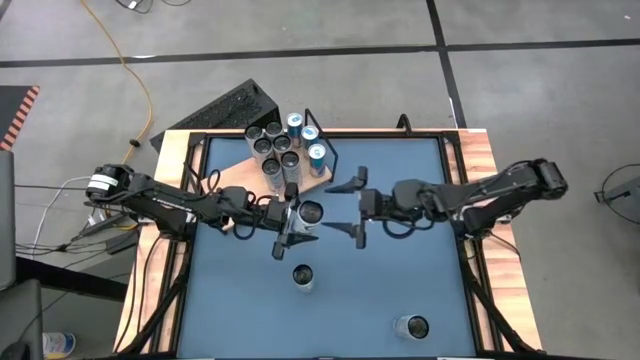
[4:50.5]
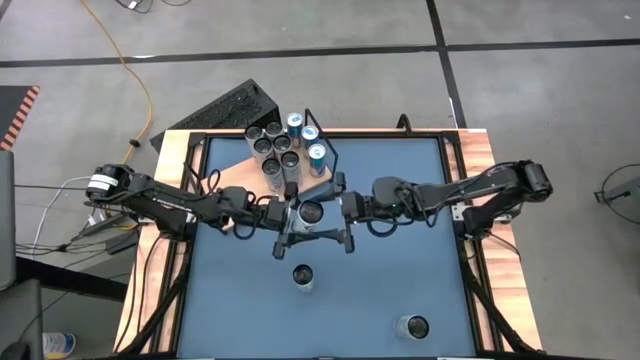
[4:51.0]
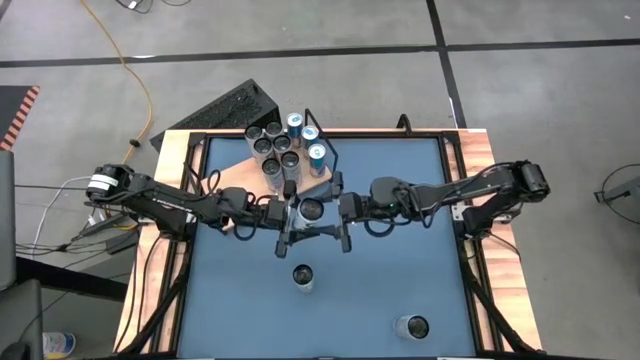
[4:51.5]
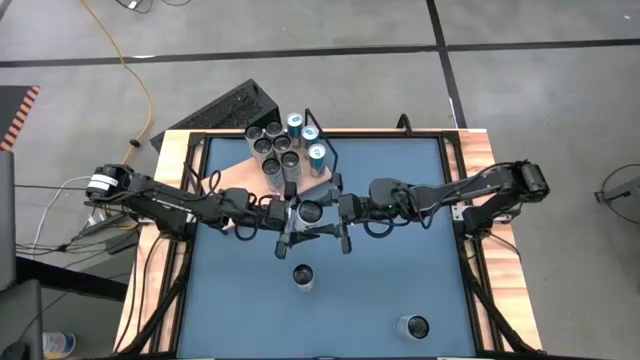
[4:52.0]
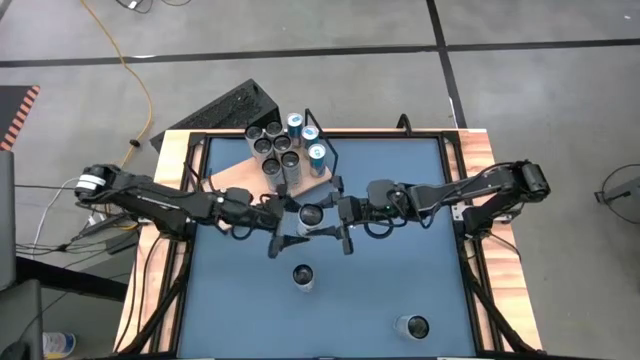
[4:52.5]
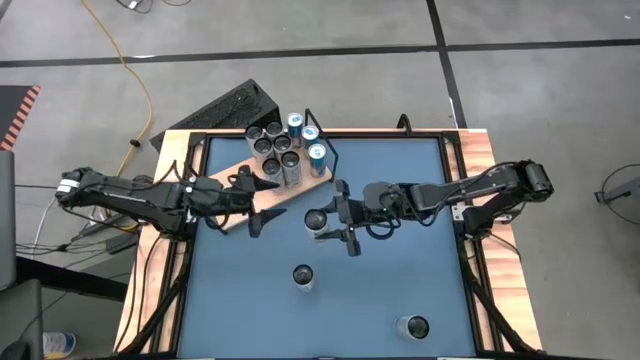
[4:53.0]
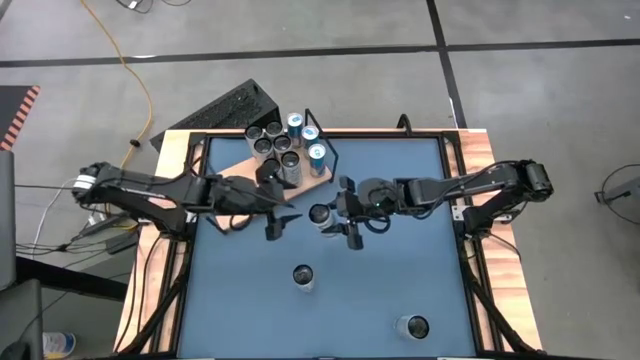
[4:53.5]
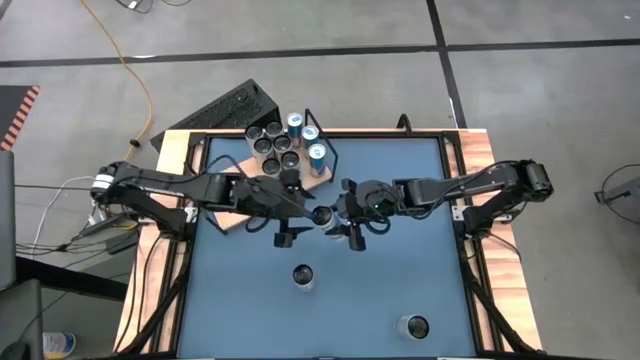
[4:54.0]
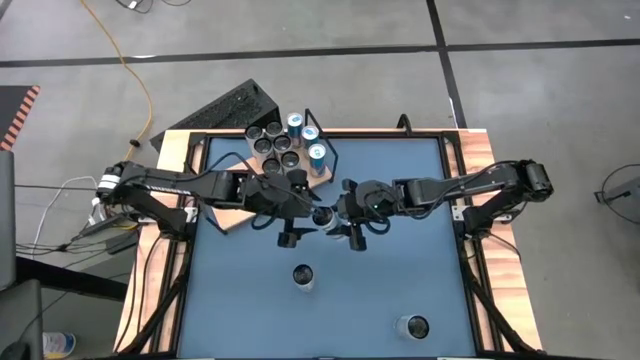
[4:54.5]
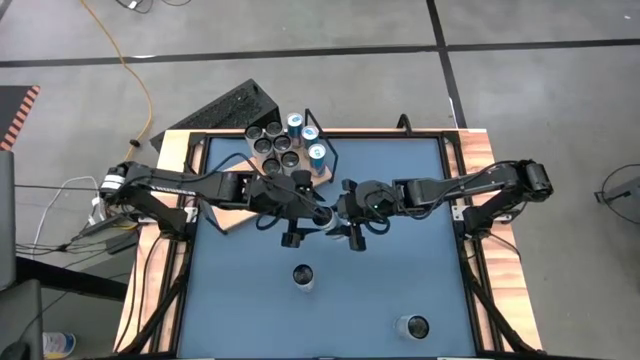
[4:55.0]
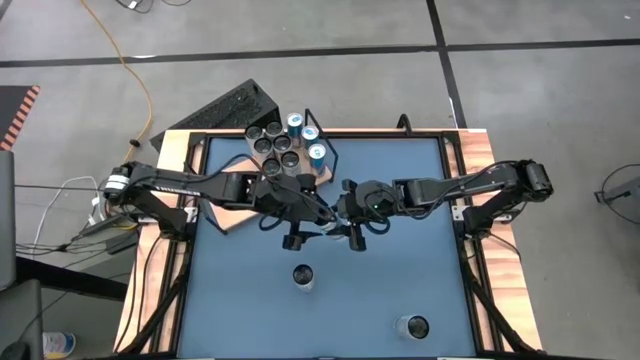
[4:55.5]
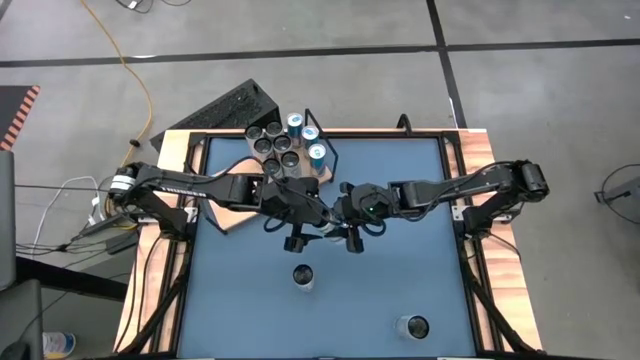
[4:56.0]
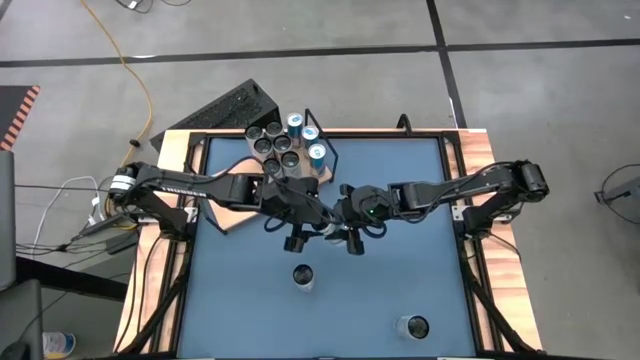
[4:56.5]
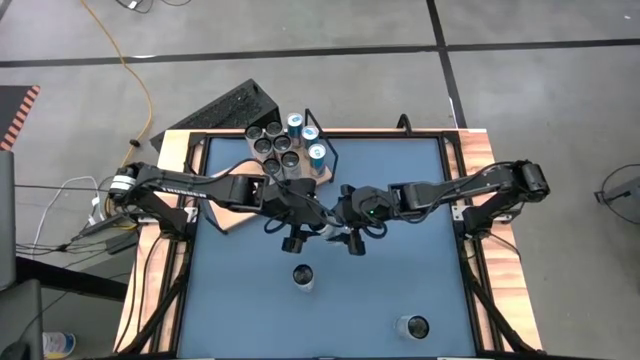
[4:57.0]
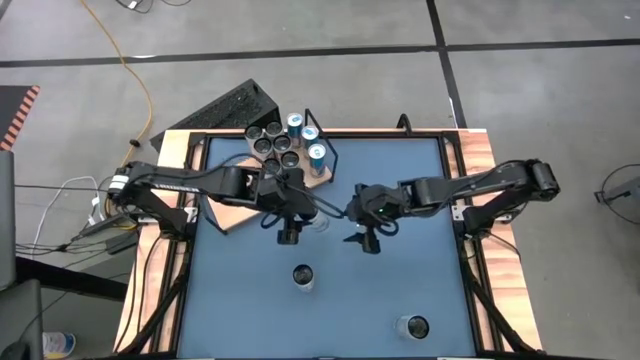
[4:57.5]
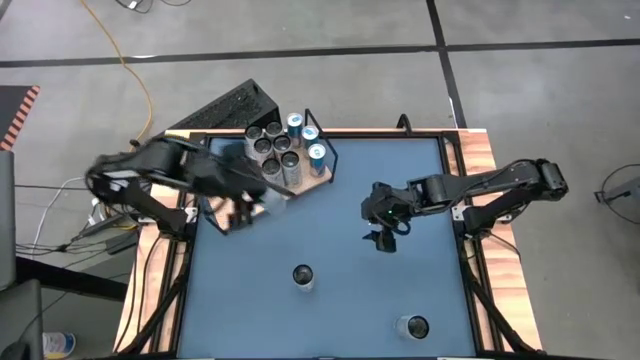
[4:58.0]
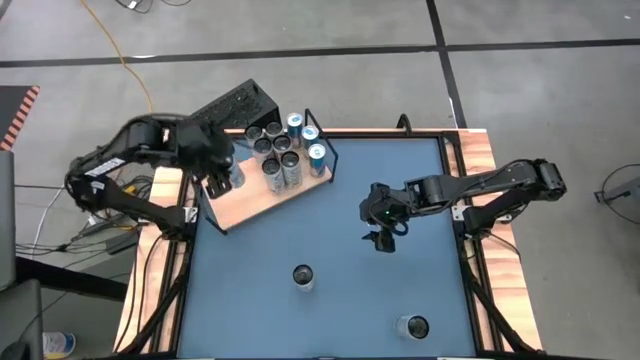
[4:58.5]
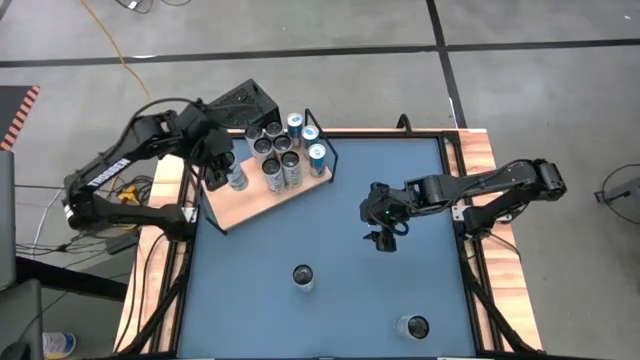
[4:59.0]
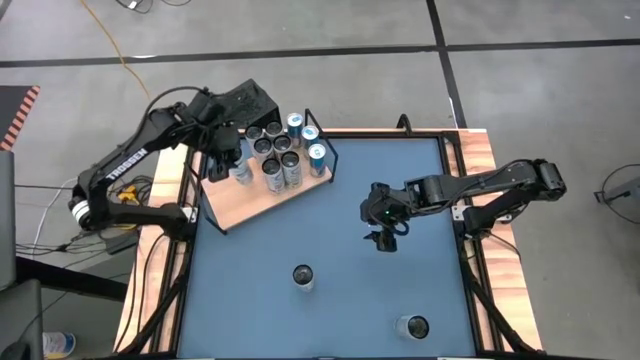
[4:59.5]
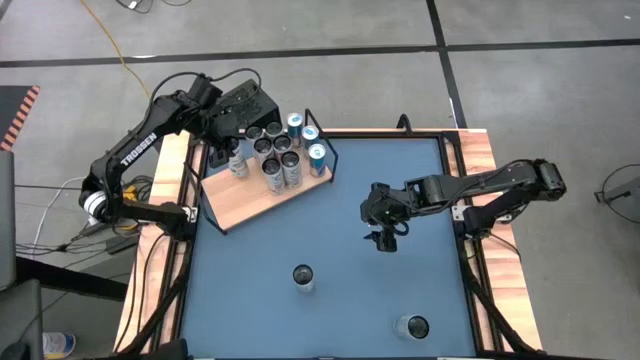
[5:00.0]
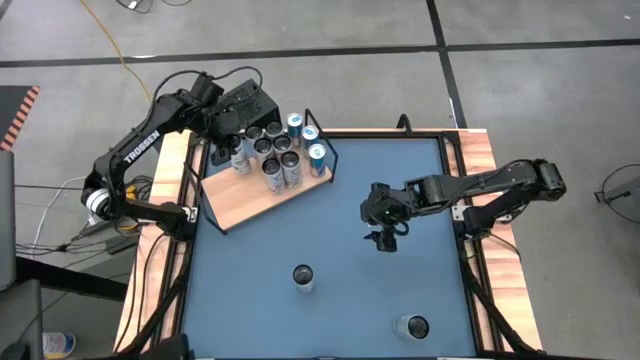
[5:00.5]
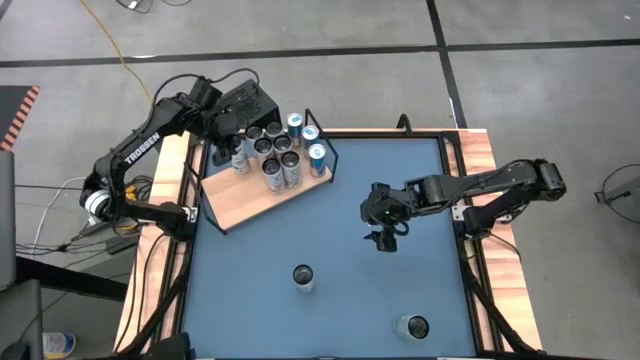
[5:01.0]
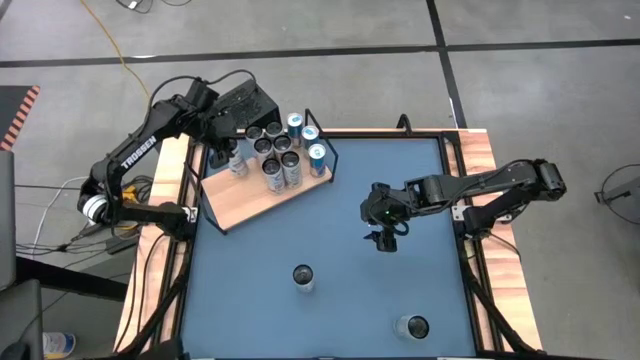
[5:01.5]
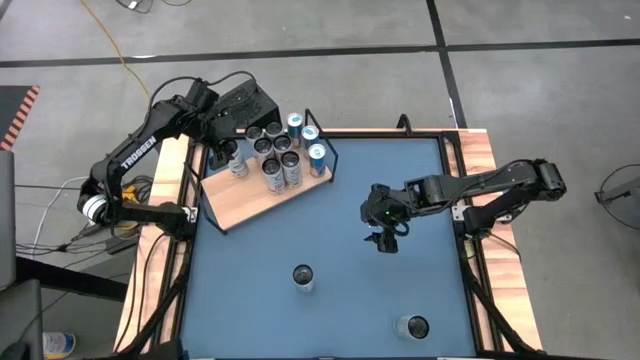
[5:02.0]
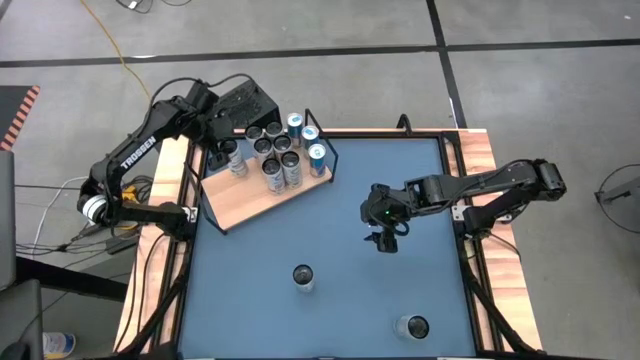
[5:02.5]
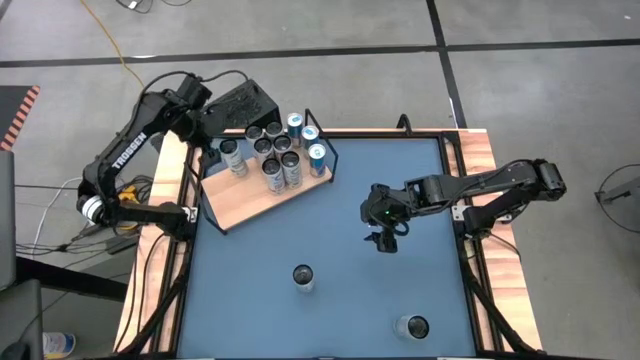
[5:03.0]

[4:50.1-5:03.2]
Task: Place canned beverage on shelf
Put the top right white and blue soda can on the shelf

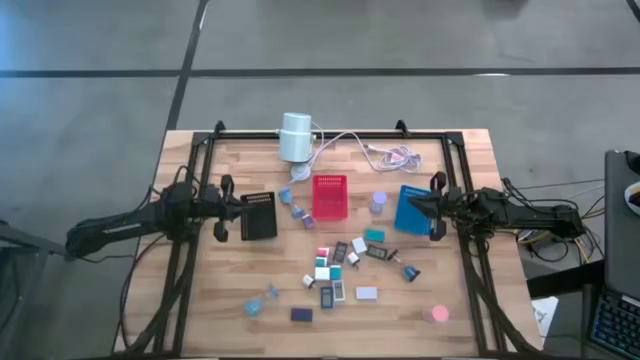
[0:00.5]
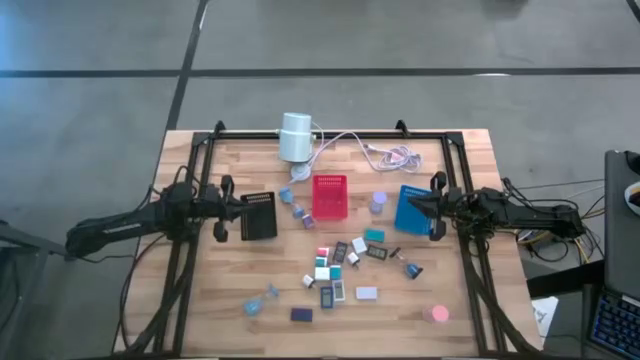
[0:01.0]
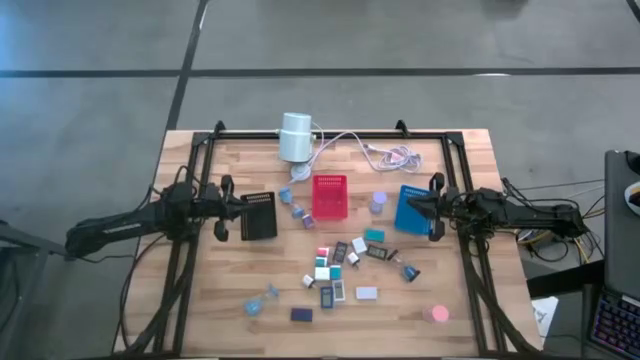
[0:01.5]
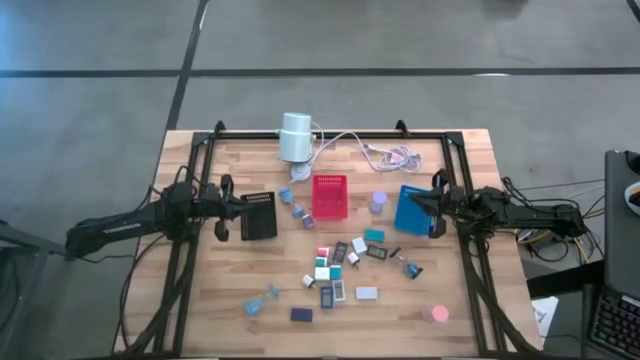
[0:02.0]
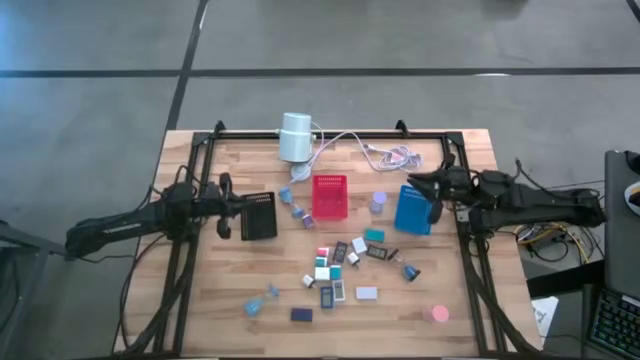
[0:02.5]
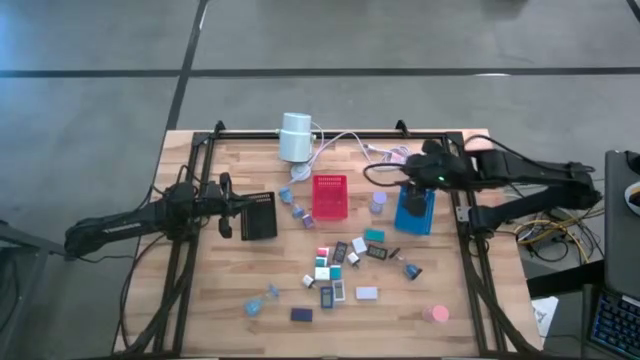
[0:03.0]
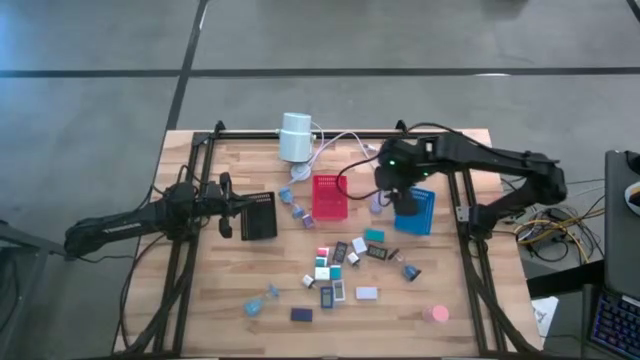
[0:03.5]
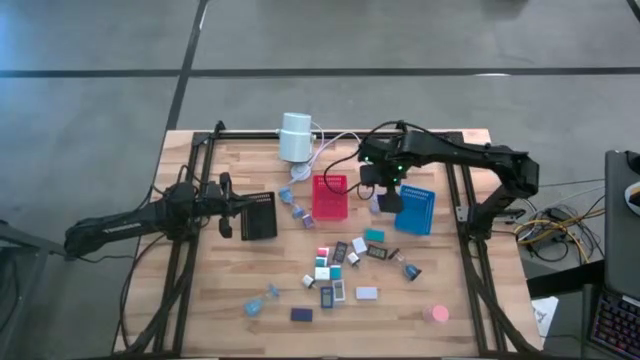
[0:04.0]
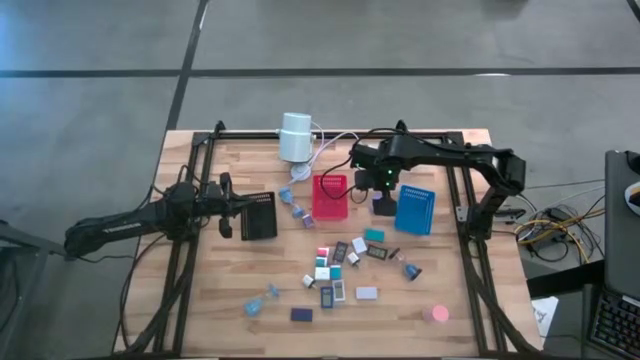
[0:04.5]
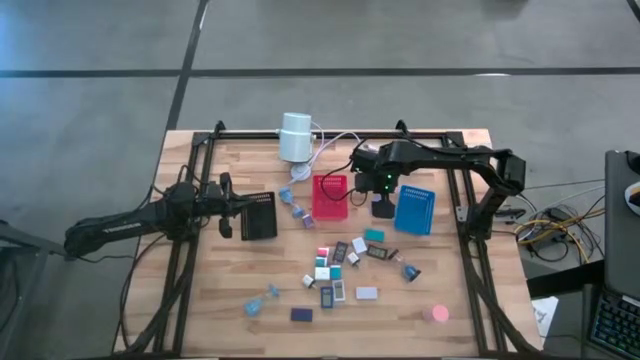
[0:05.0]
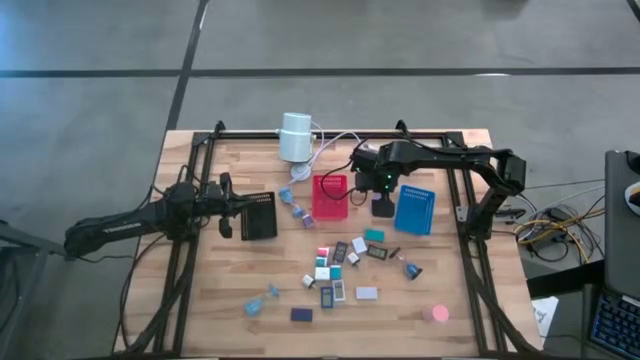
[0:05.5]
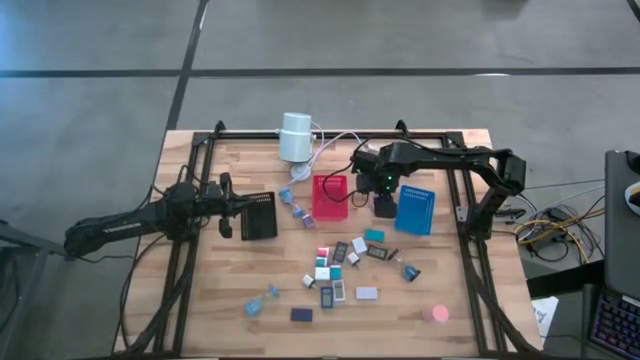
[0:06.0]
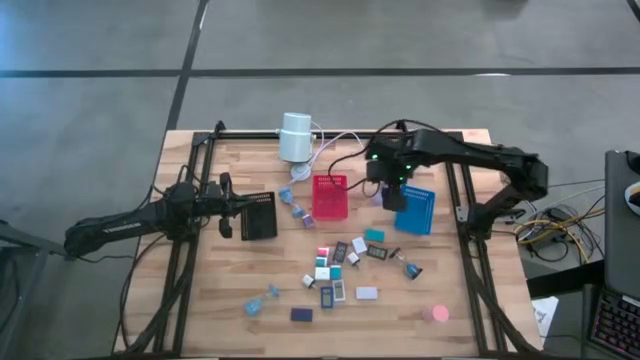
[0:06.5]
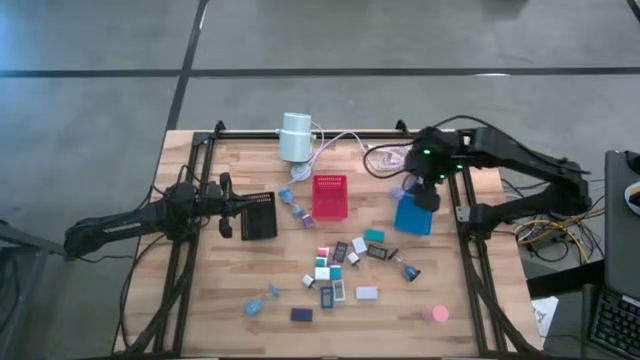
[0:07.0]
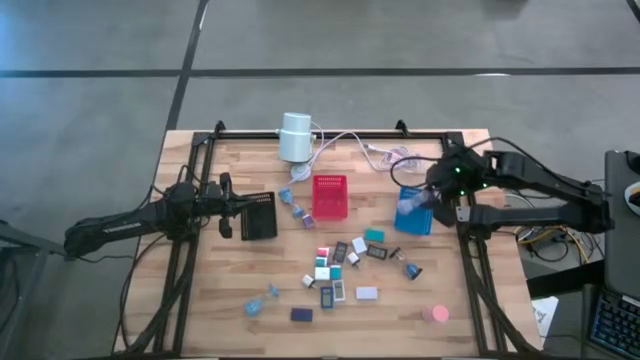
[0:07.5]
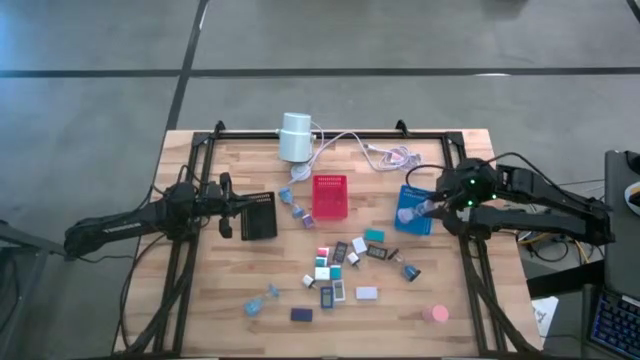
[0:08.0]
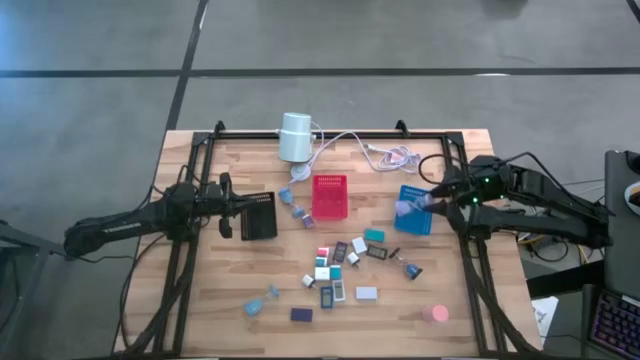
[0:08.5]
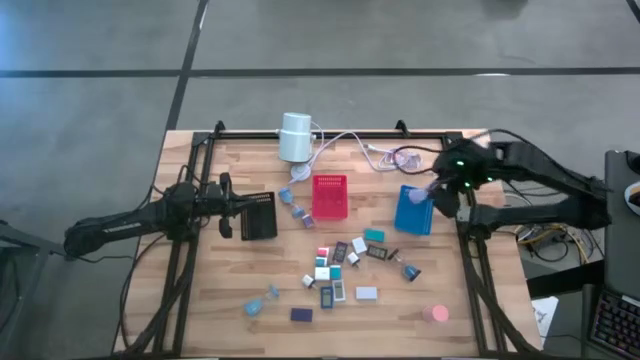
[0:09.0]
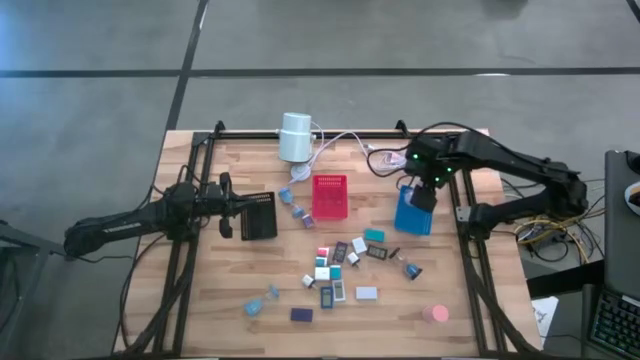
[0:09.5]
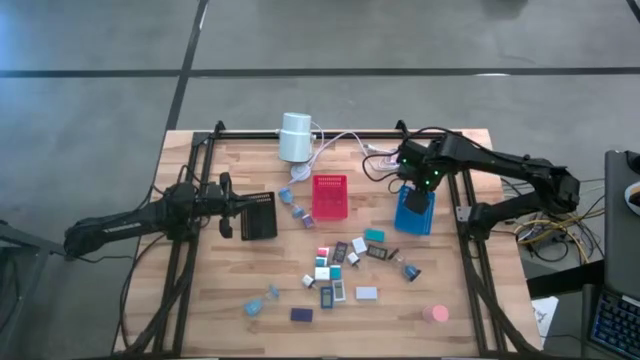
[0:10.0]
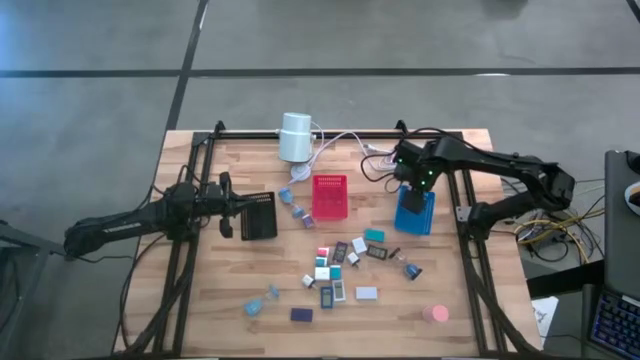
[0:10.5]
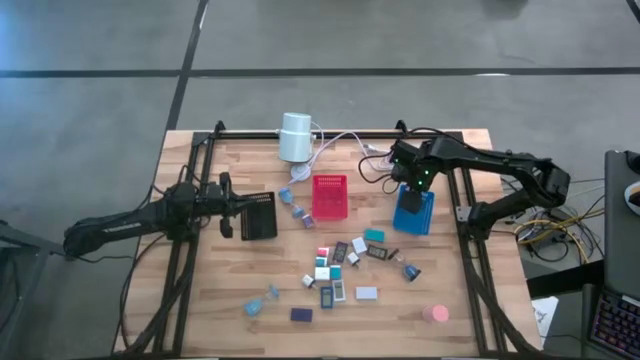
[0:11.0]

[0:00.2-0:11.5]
Task: Pick & Place Office items
Put the purple hourglass into the blue basket
